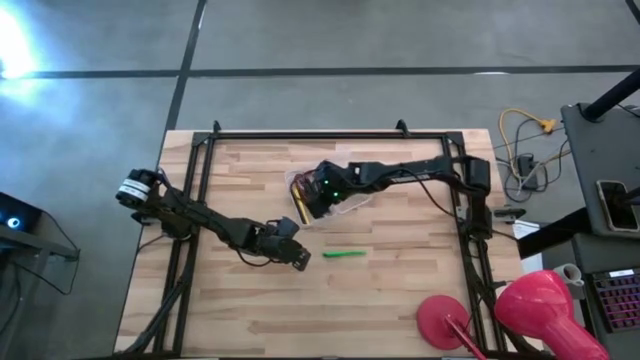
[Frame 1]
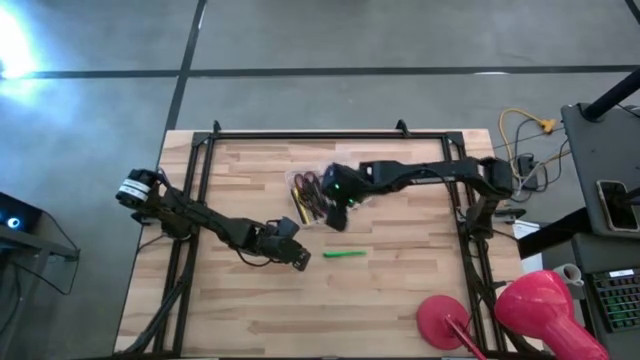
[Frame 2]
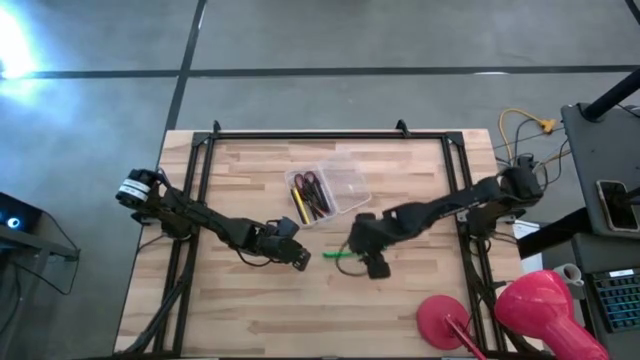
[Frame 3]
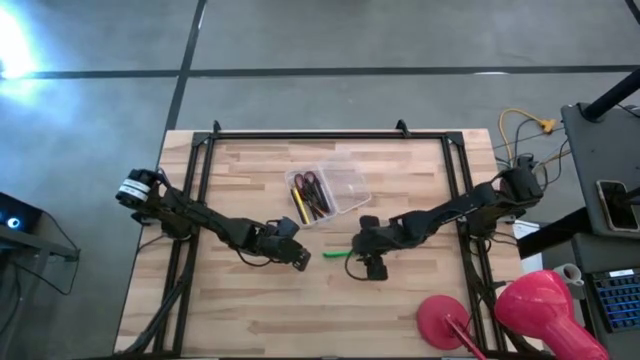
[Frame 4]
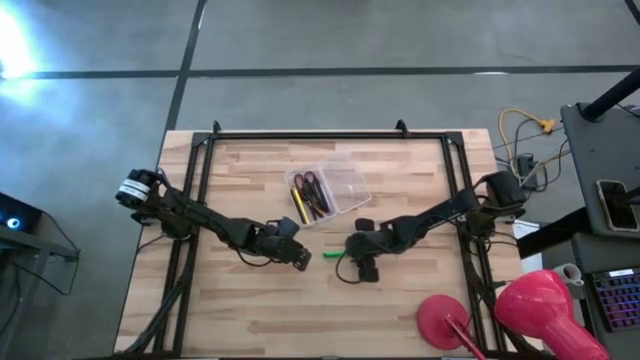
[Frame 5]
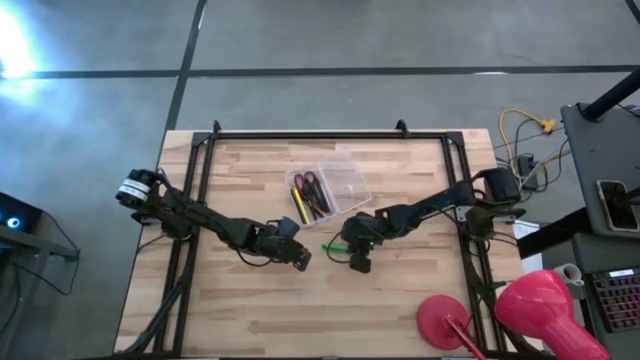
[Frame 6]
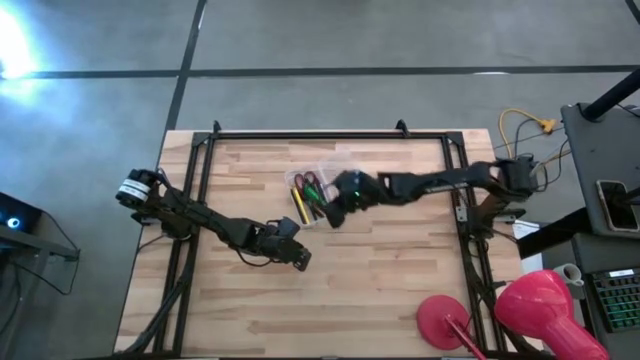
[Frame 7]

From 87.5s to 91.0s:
Task: Pick & place school supplies into a supply box
Put the green pen into the transparent supply box

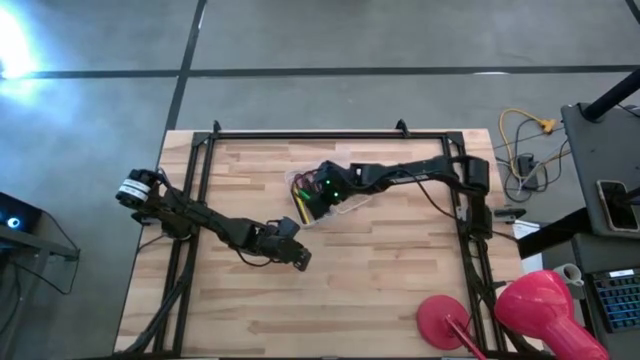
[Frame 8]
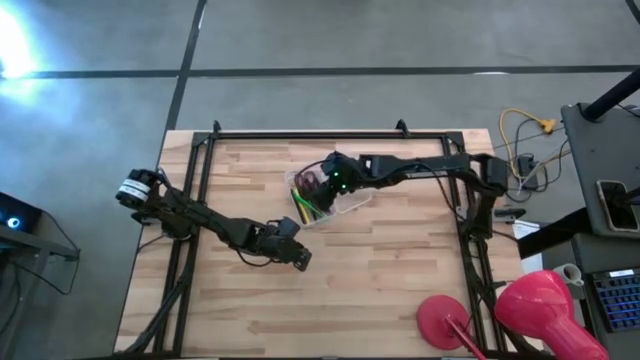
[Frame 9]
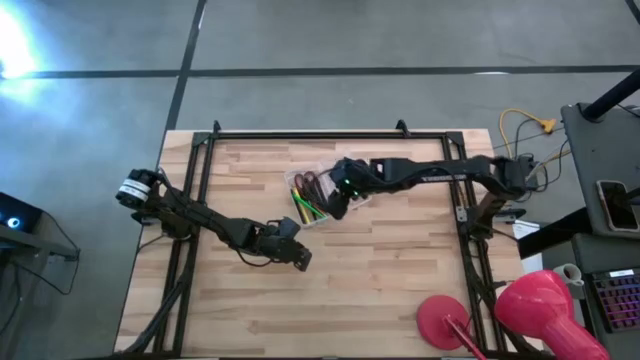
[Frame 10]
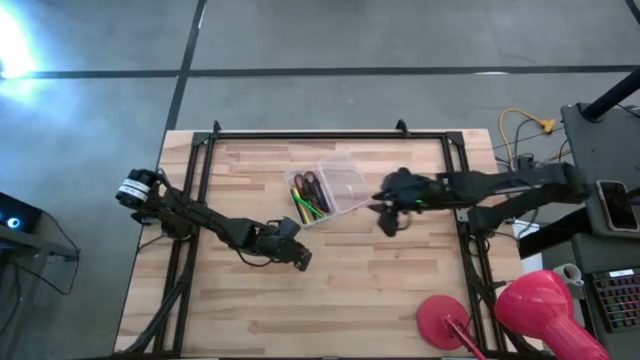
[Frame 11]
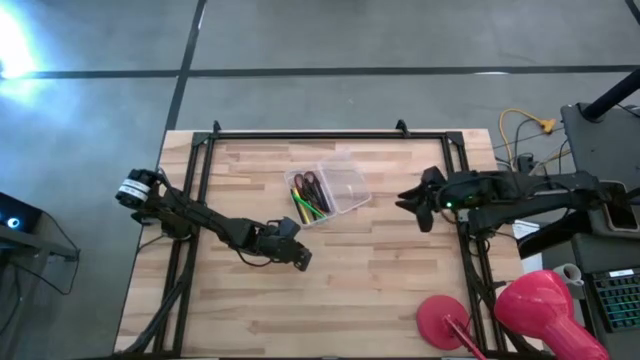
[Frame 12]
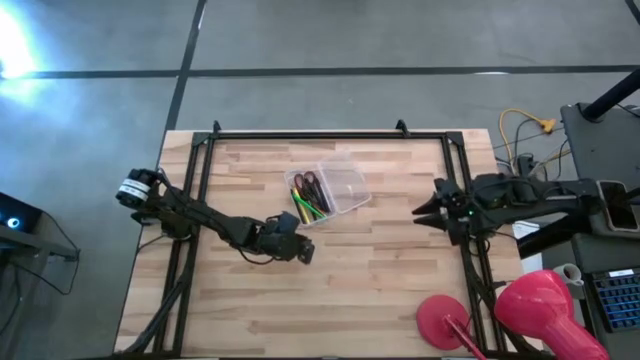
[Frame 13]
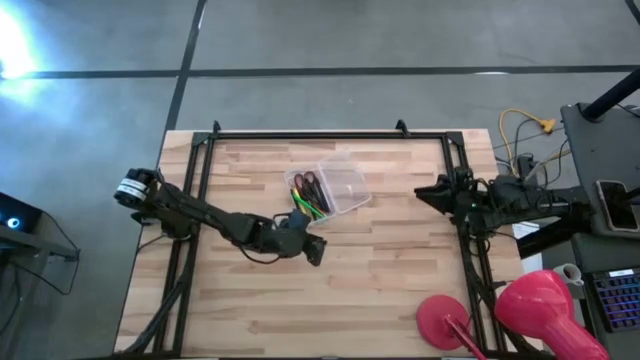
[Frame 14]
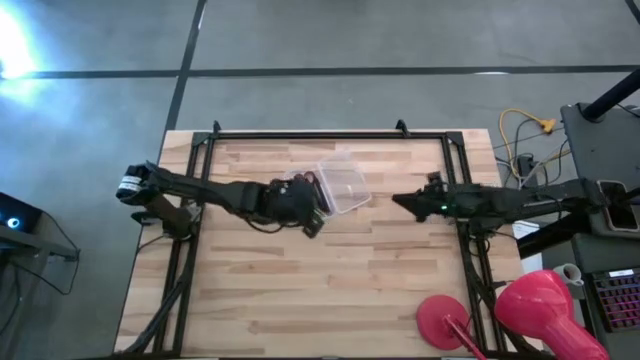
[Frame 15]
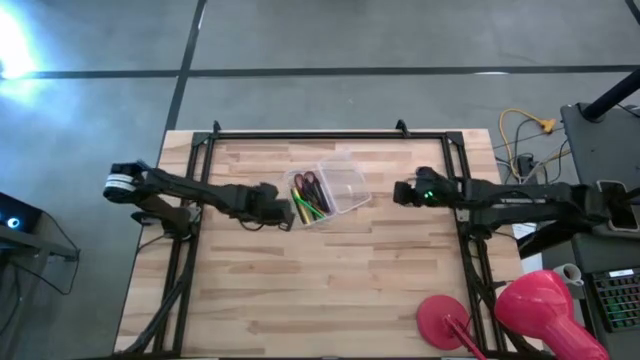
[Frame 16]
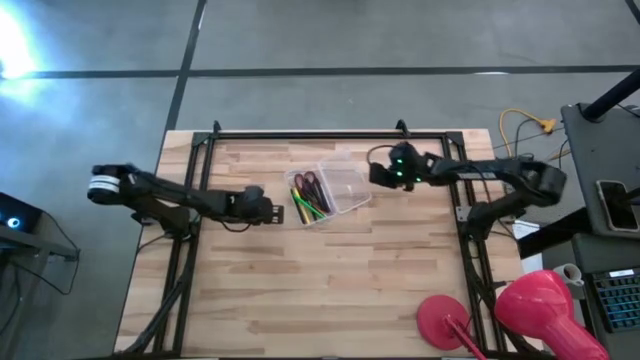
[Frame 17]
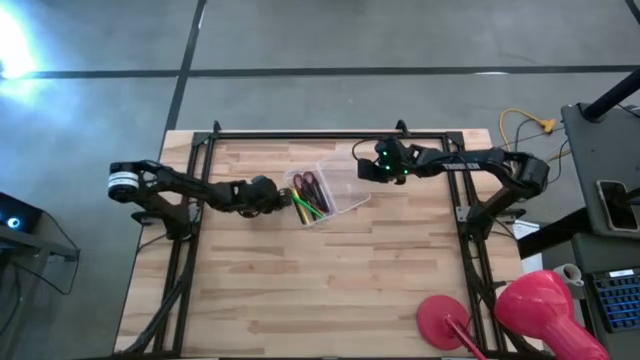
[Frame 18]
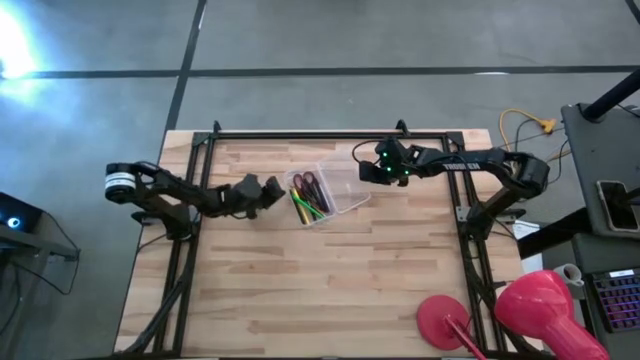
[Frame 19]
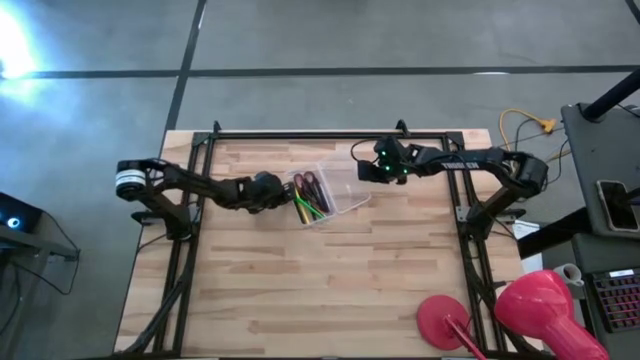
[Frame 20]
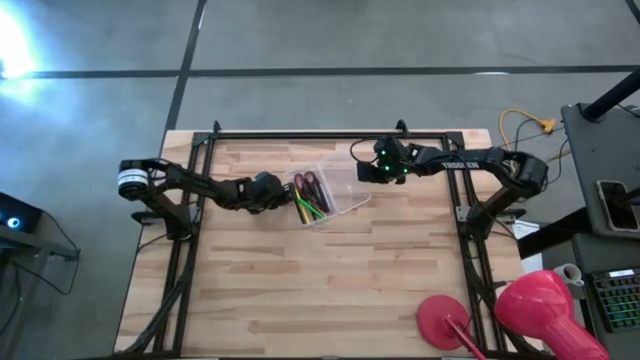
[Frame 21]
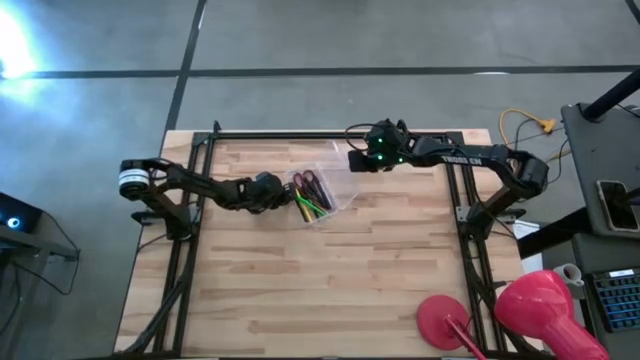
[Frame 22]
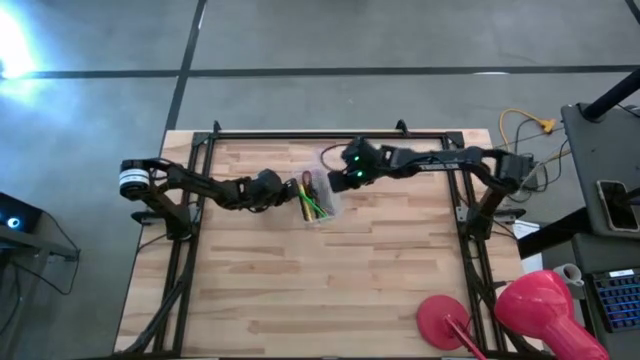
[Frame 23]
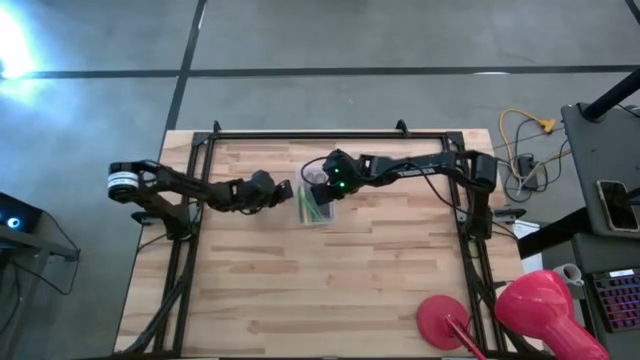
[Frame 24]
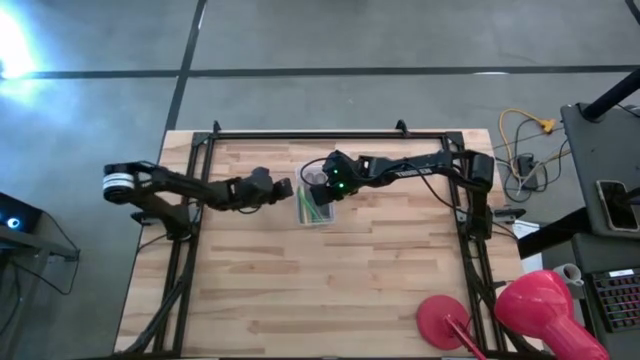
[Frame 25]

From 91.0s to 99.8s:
Close the supply box

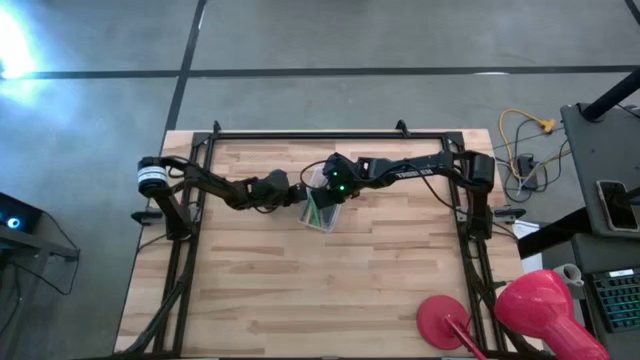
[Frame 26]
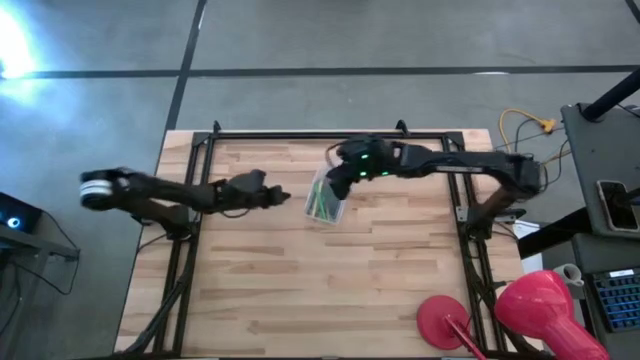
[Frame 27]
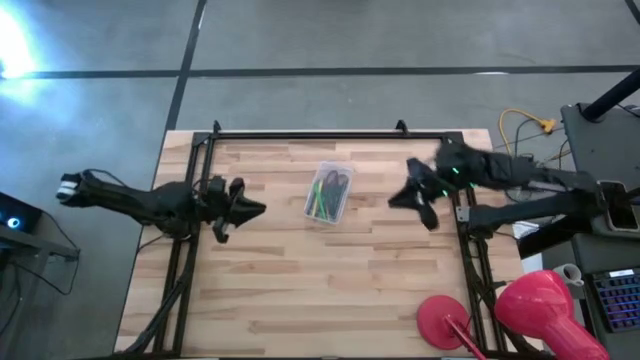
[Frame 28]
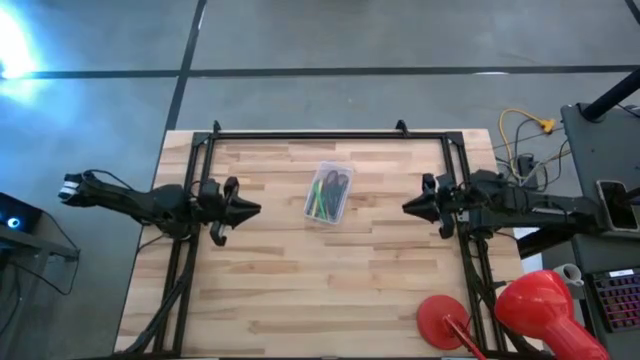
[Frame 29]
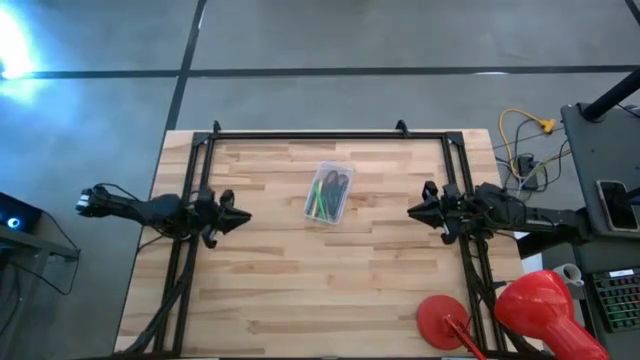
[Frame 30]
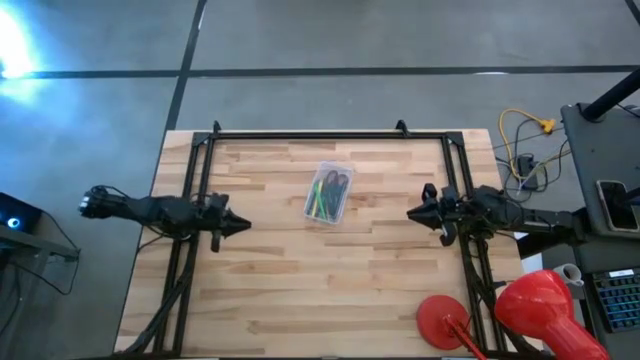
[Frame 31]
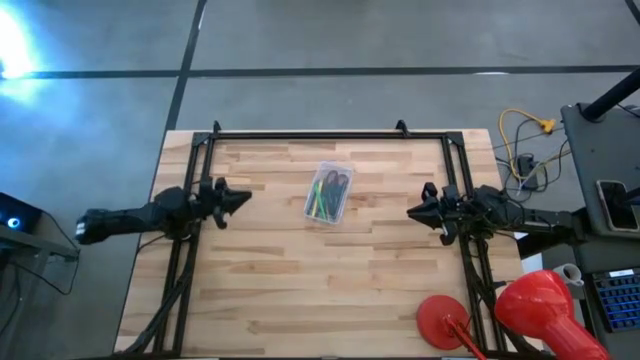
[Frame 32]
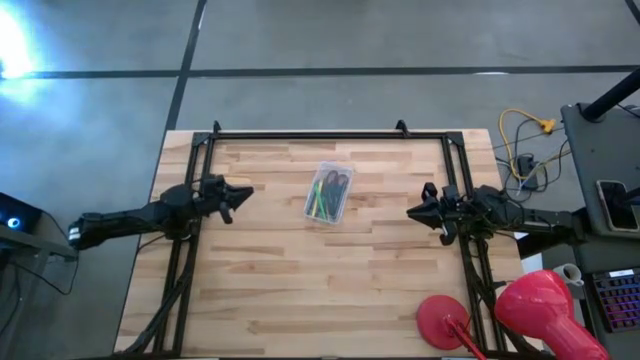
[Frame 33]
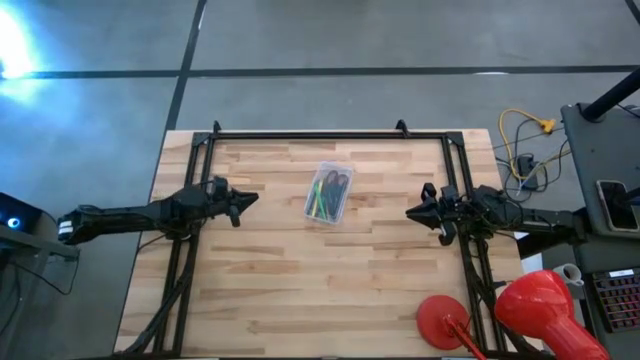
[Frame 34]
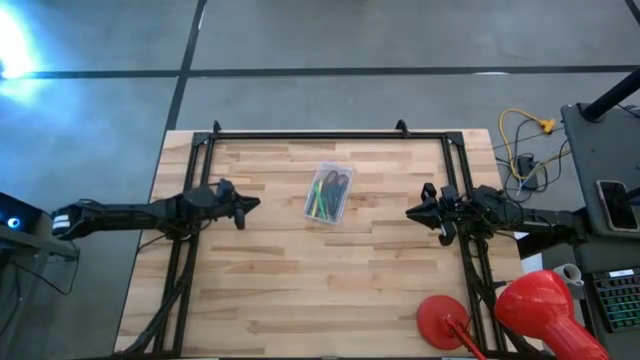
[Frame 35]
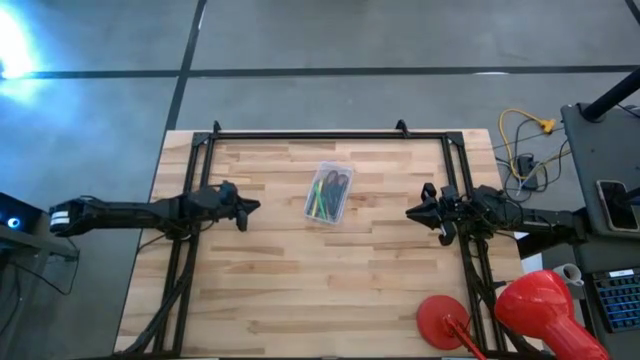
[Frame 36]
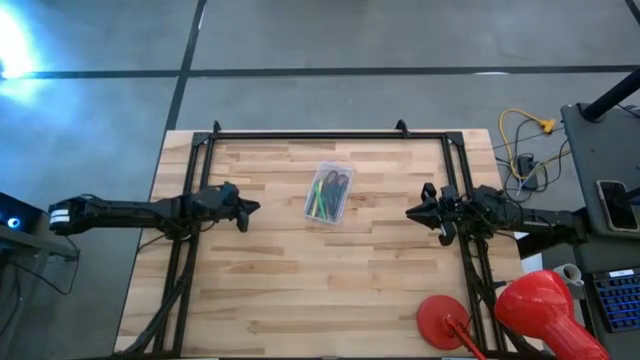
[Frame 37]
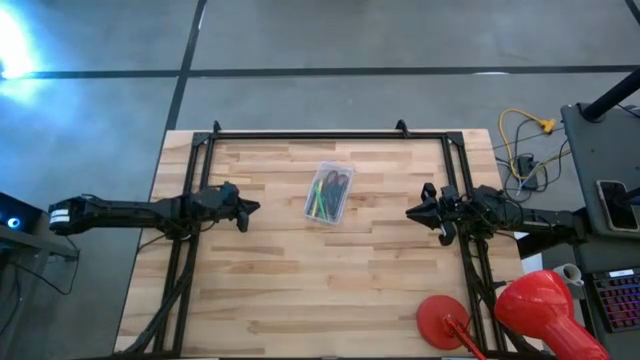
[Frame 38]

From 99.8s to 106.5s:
Return to Home Position
